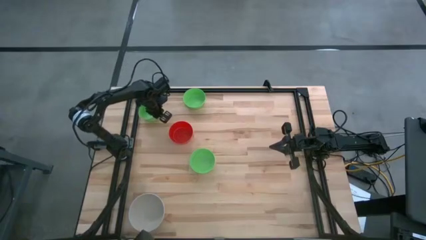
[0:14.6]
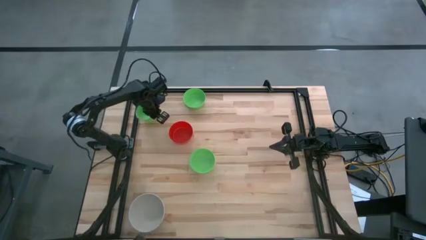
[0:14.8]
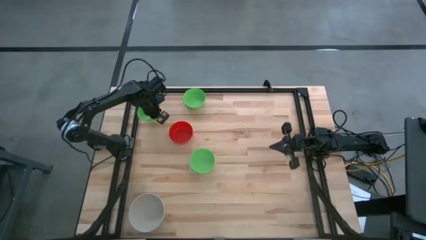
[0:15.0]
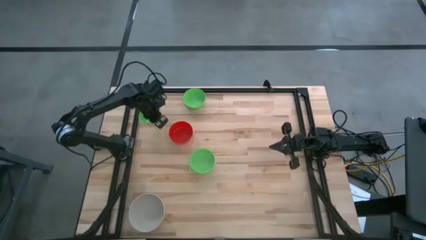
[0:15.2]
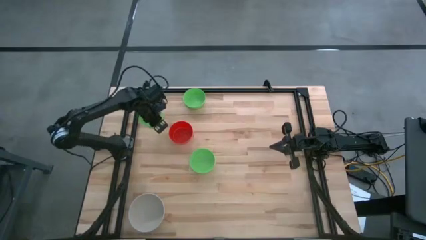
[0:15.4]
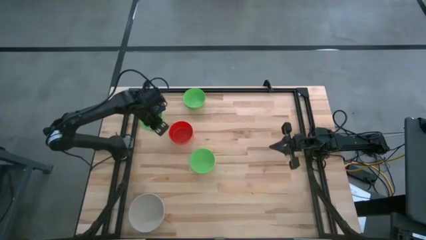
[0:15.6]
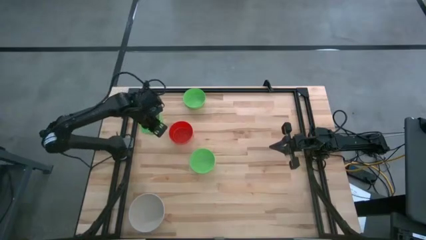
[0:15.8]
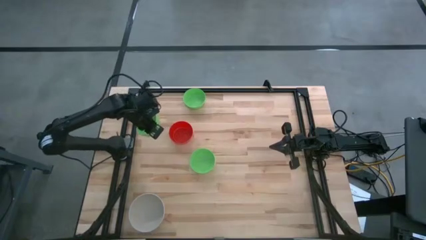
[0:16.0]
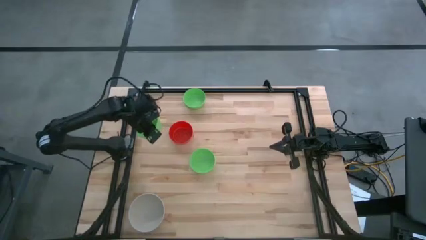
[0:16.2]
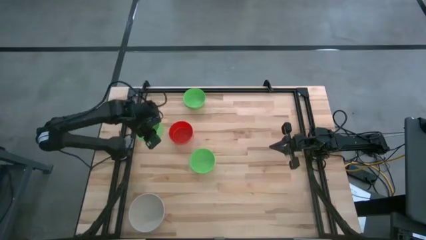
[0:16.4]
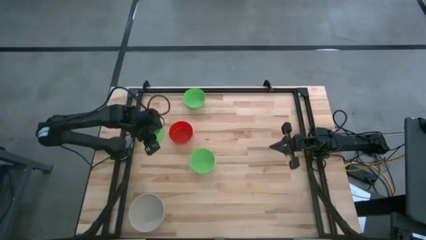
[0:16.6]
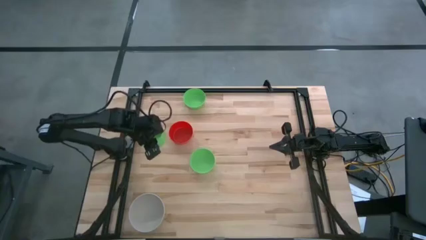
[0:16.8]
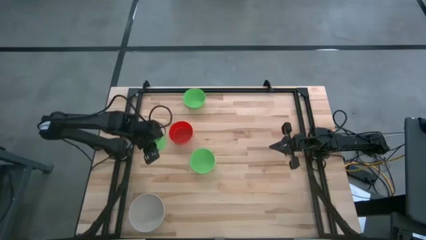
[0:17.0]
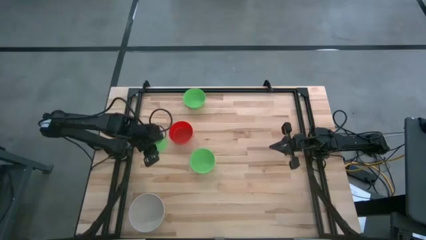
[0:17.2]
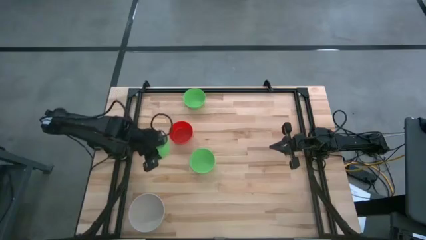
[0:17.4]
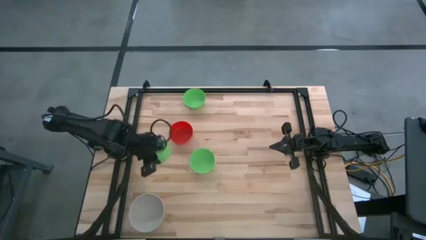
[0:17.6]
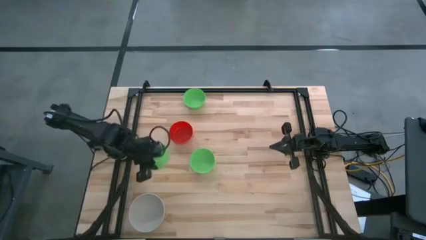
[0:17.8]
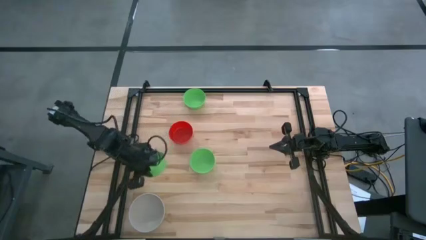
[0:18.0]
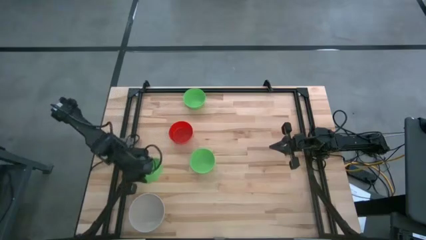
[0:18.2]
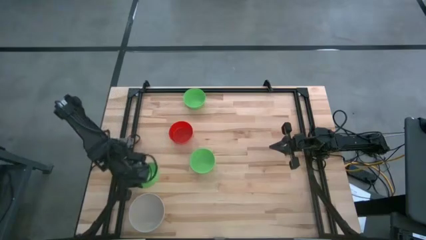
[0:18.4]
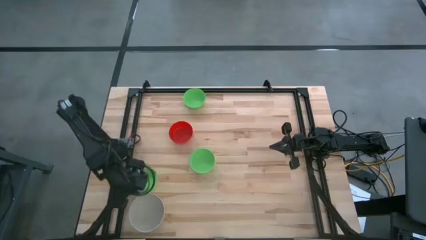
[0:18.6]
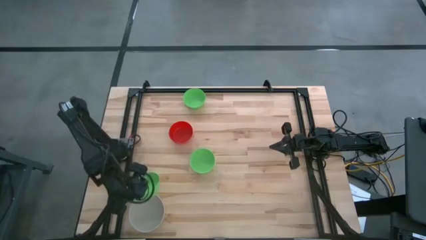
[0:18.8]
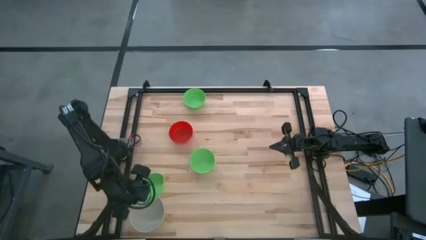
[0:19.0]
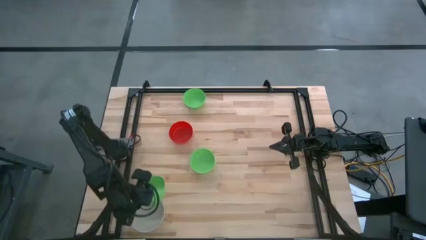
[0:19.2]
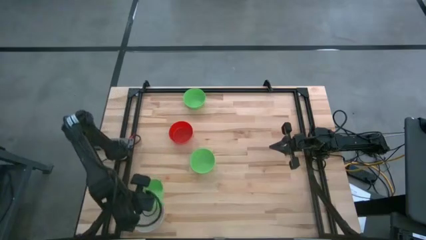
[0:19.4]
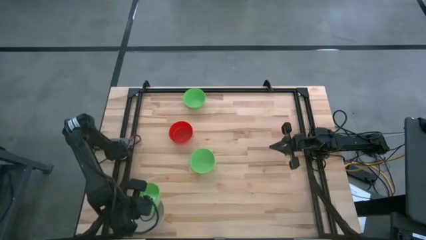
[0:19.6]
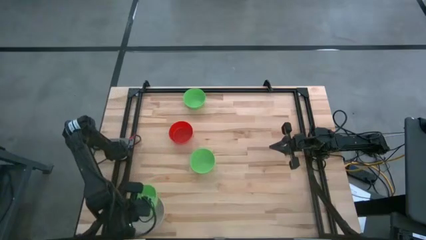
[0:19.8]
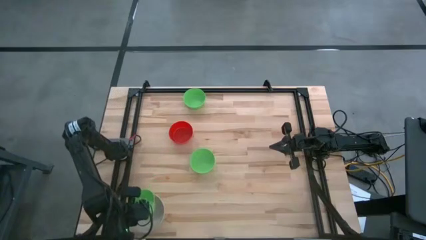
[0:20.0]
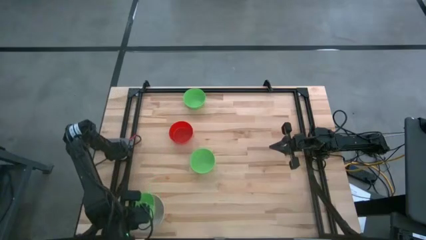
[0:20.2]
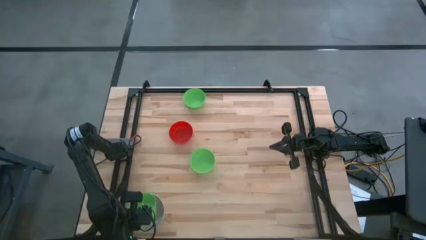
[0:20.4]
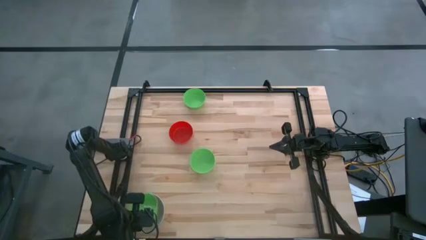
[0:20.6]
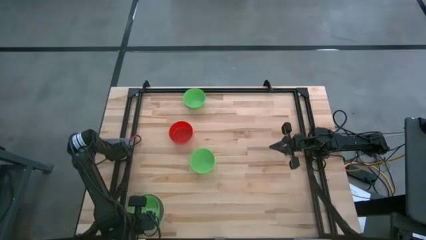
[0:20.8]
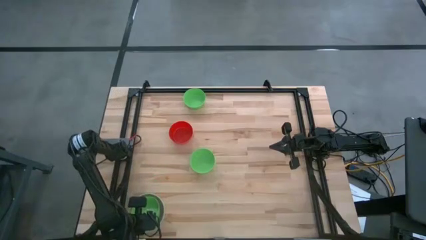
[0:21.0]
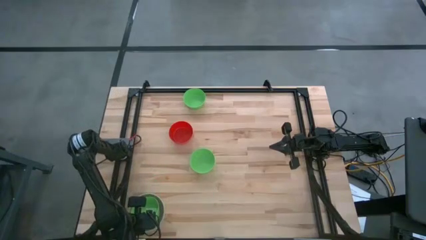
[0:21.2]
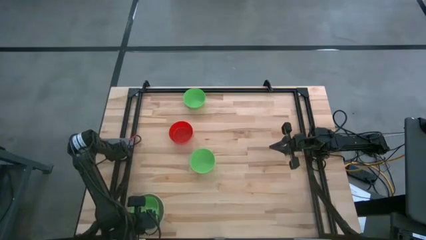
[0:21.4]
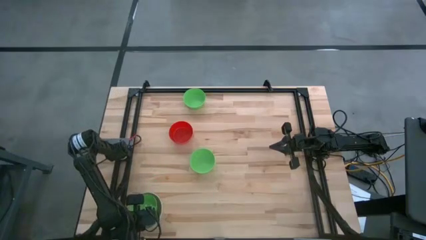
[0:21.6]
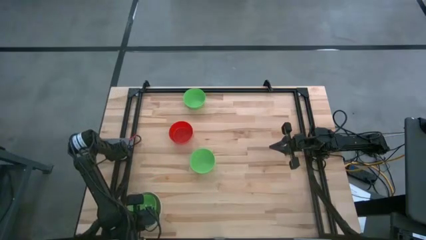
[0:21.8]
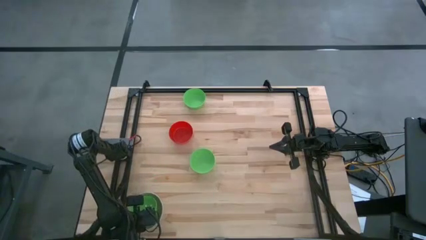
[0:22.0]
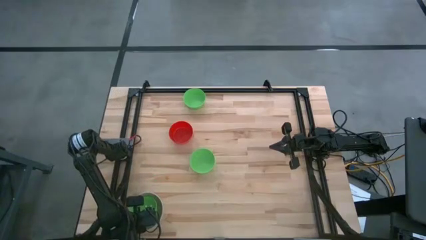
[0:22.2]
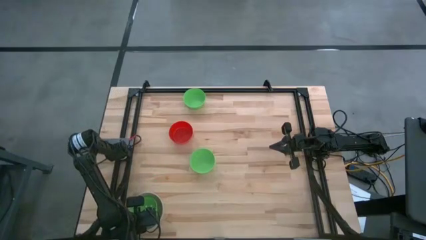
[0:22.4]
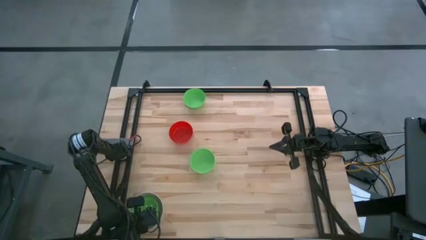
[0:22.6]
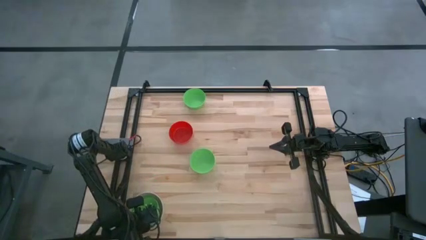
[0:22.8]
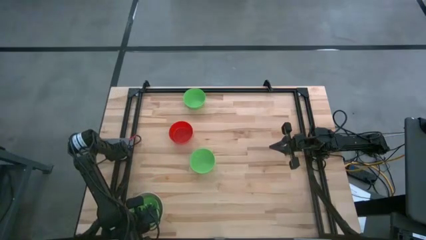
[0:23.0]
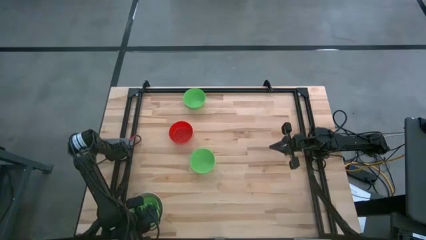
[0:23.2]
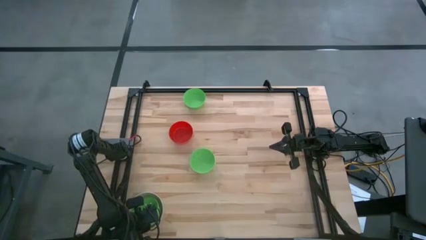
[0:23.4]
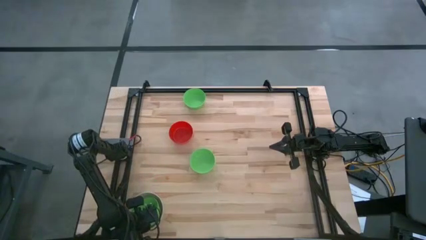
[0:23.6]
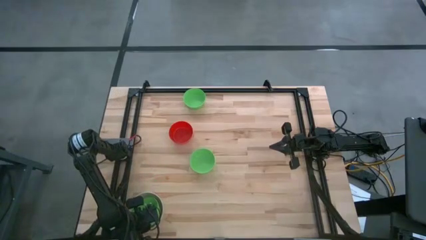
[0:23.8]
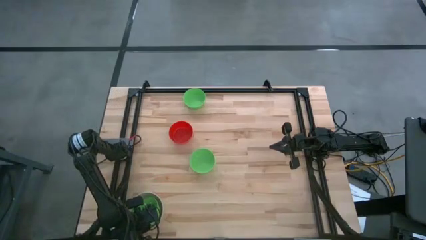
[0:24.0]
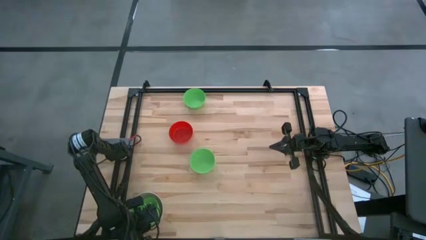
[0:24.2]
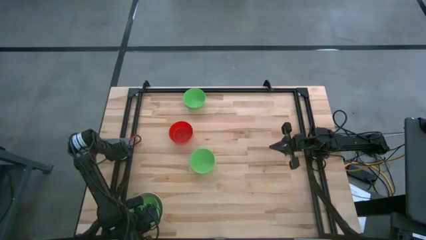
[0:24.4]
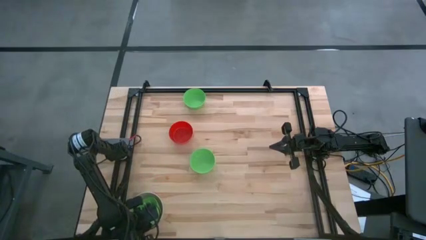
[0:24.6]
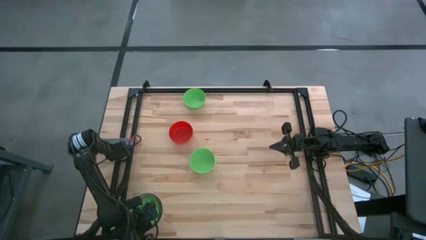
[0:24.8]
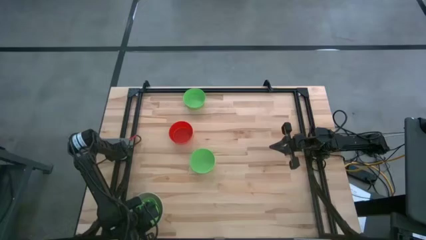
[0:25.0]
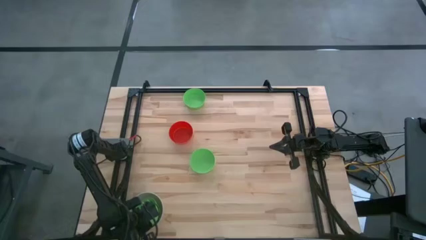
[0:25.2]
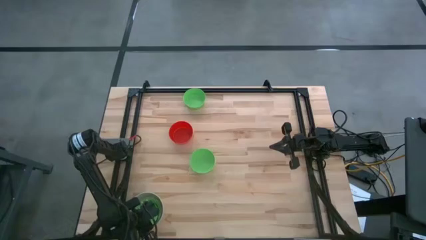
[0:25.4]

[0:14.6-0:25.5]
Stack the top left green bowl on top of the grey bowl

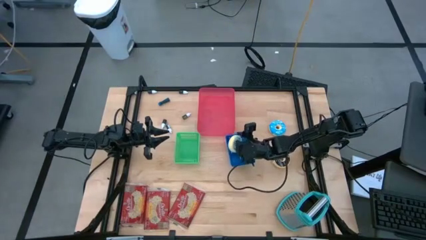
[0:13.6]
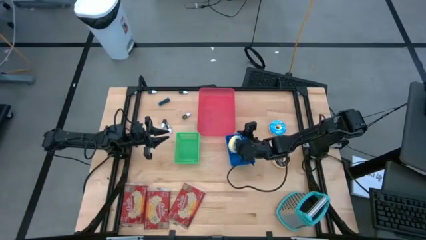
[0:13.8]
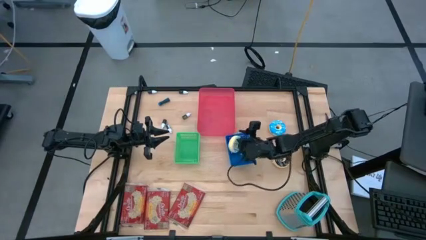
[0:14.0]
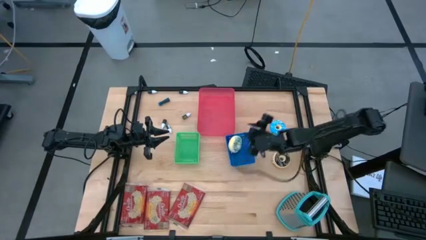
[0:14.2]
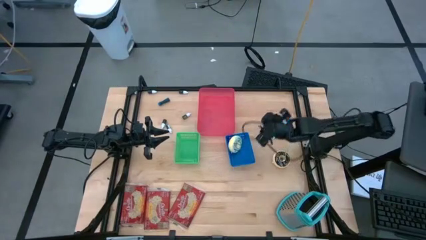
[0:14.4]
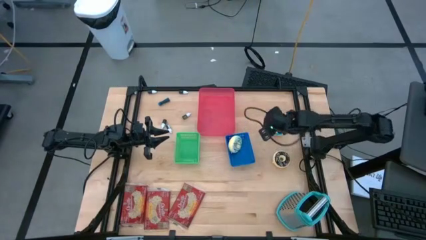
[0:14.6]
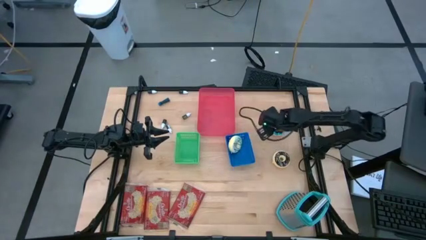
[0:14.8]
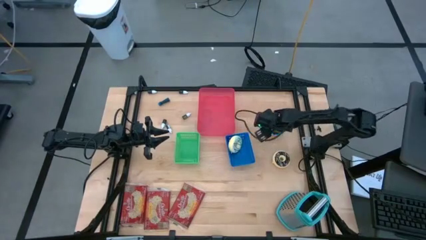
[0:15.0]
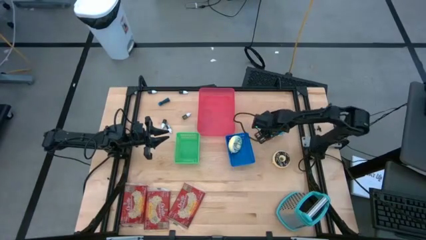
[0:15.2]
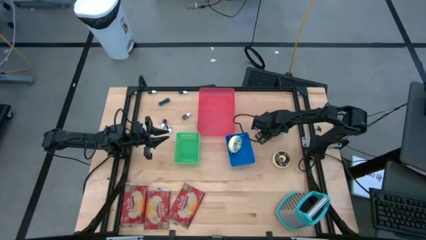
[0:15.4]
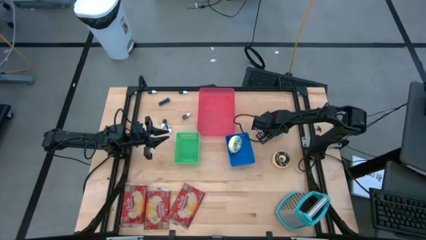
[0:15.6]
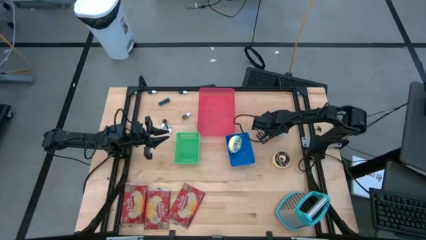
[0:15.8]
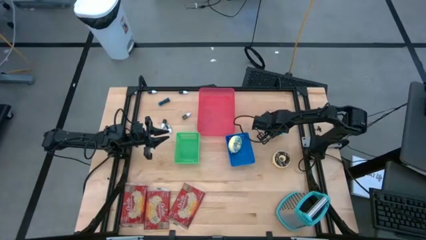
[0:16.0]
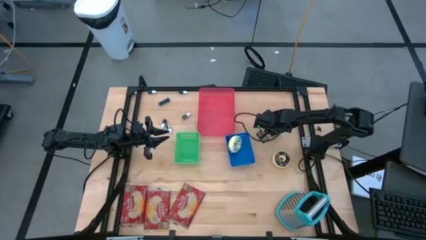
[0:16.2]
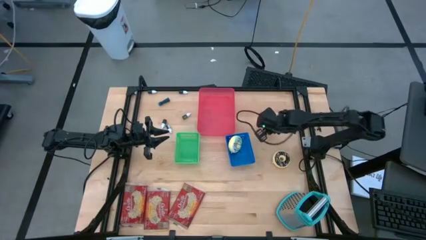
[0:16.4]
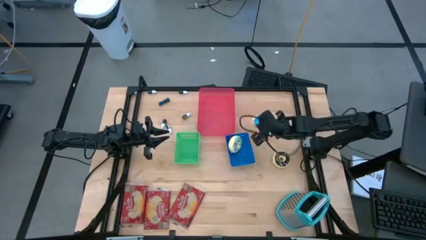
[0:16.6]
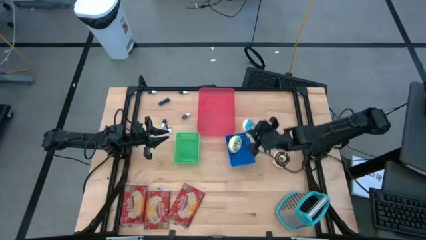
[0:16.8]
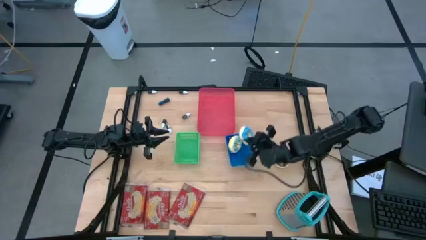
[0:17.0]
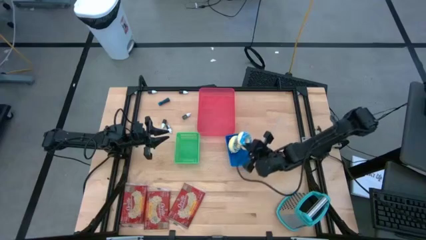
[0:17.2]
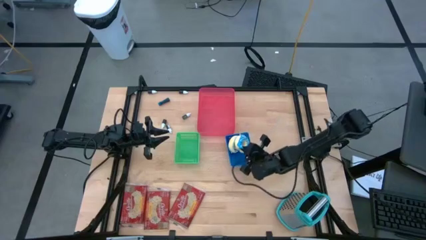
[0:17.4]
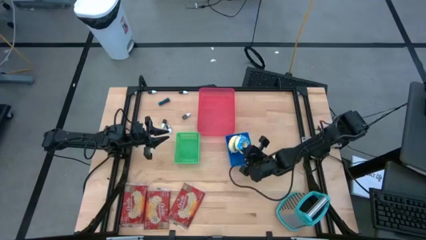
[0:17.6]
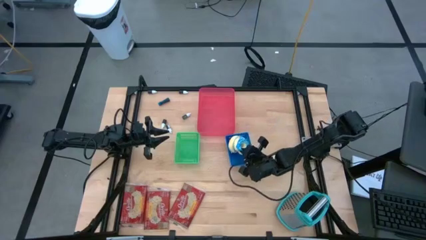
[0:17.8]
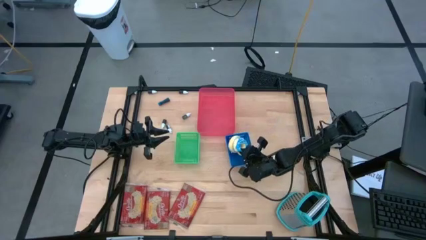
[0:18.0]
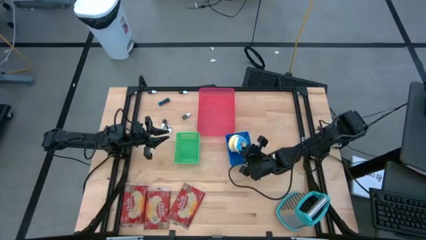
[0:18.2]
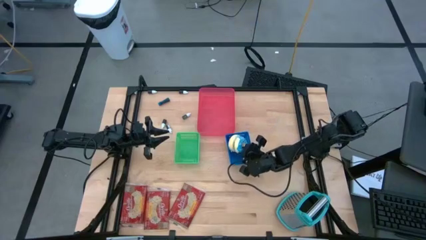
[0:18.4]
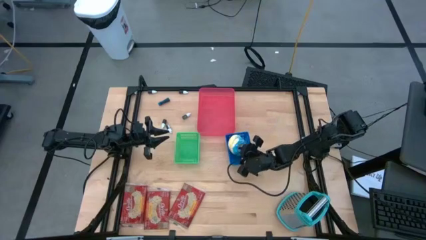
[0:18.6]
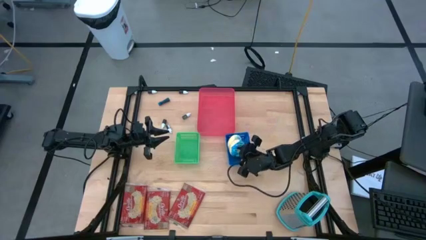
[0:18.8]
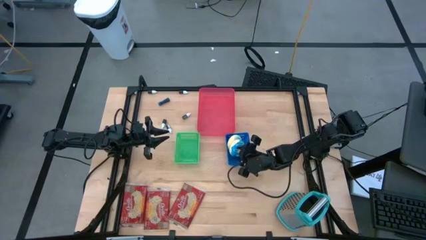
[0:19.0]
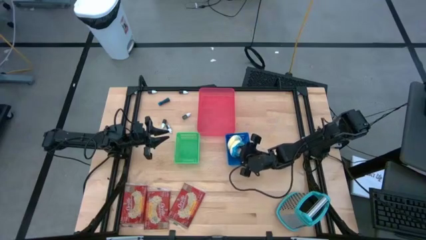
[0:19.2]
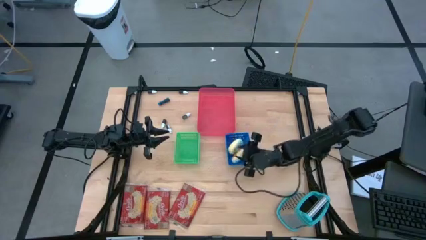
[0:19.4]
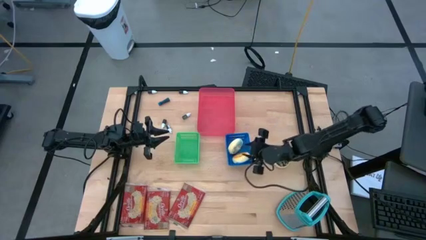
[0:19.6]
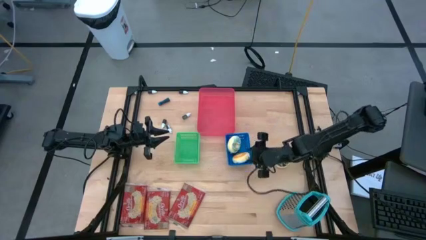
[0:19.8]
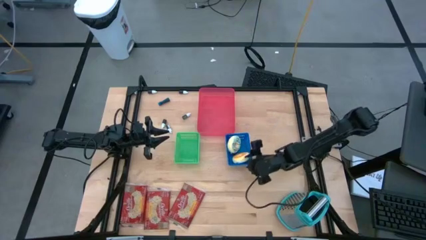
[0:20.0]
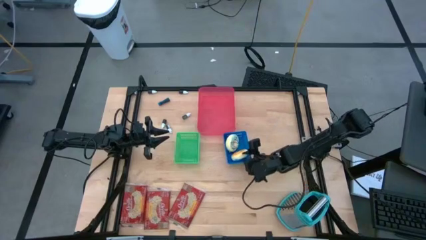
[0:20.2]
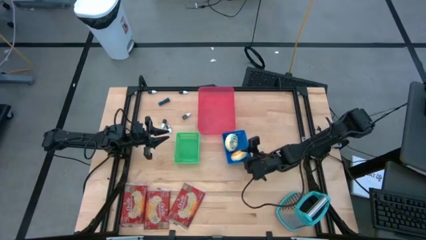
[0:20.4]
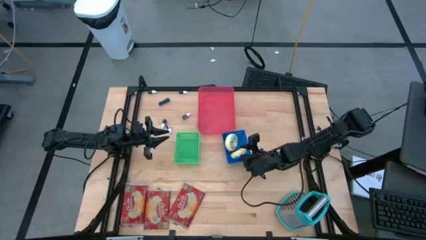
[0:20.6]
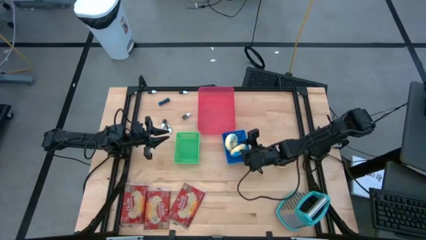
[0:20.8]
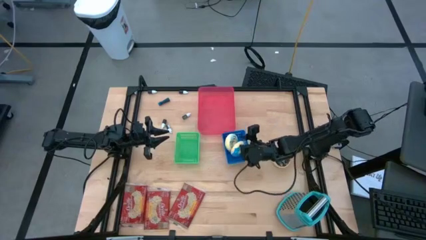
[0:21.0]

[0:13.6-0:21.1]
Put the blue doughnut into the blue bin
